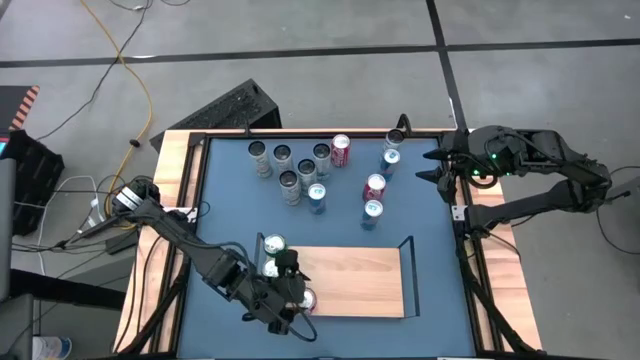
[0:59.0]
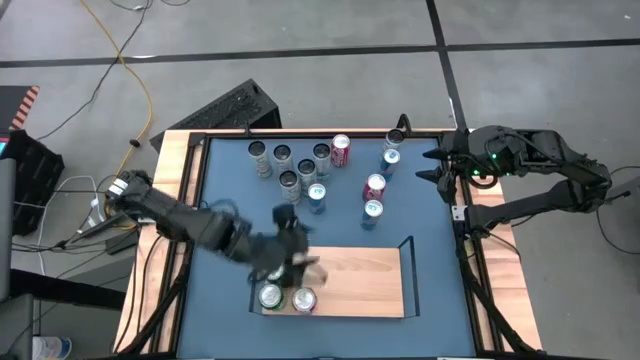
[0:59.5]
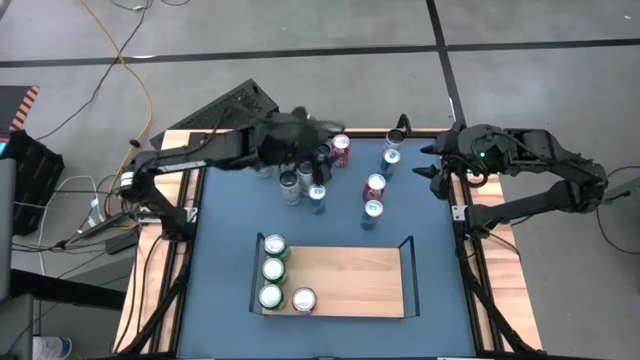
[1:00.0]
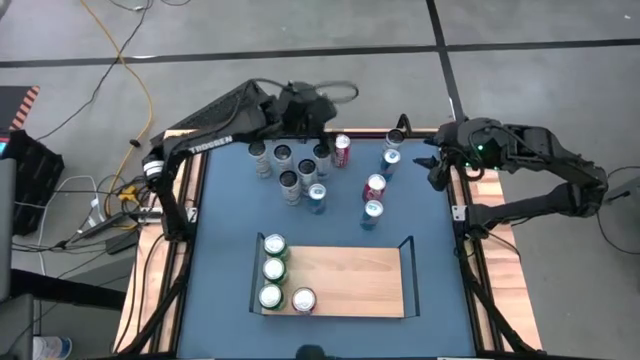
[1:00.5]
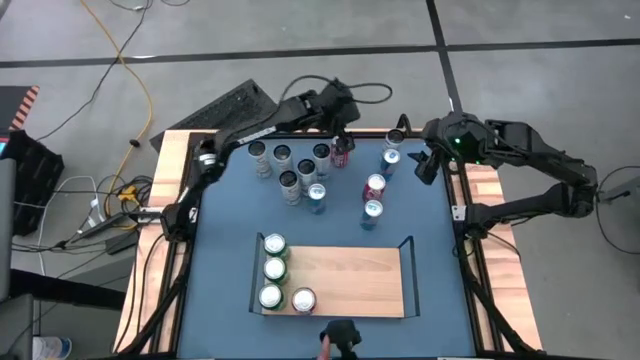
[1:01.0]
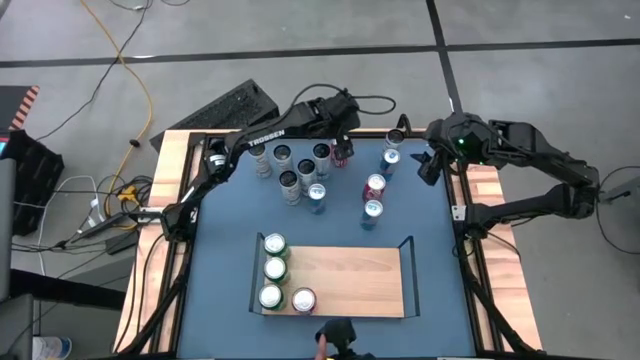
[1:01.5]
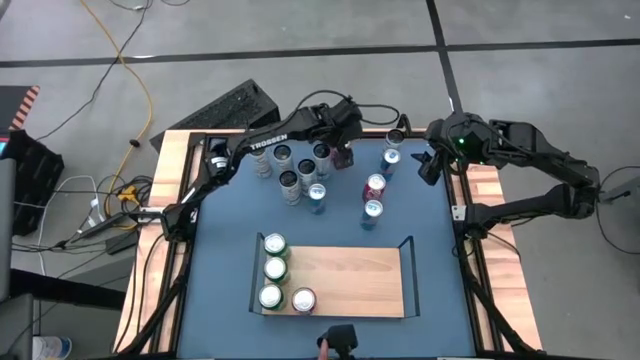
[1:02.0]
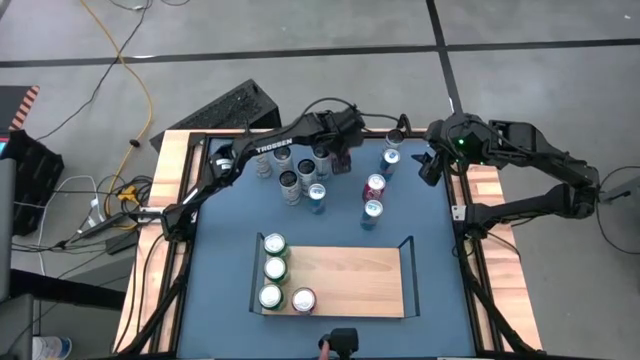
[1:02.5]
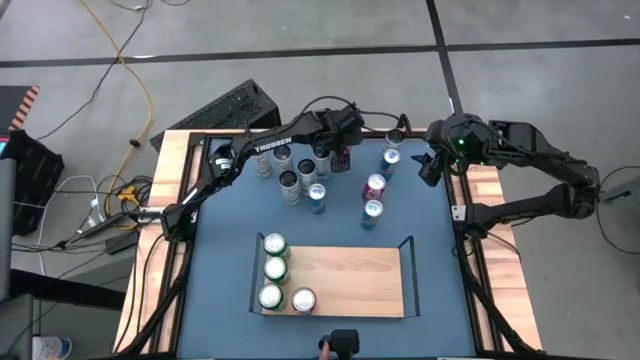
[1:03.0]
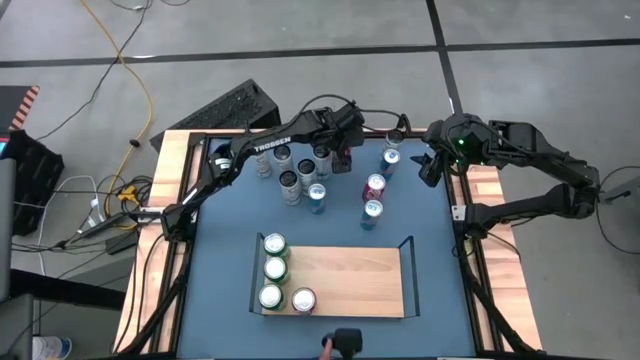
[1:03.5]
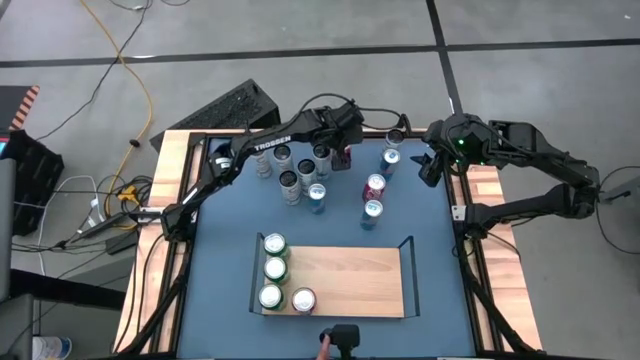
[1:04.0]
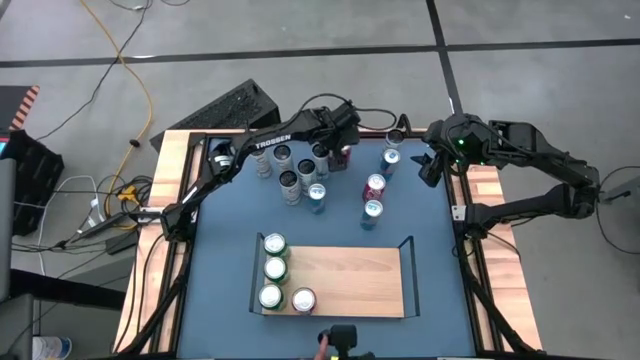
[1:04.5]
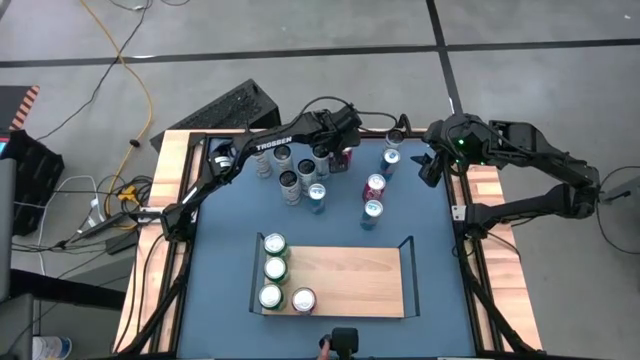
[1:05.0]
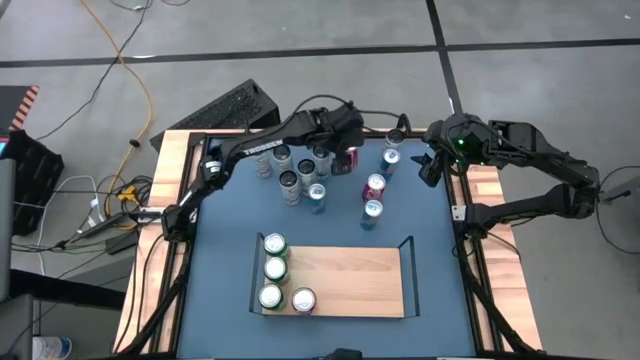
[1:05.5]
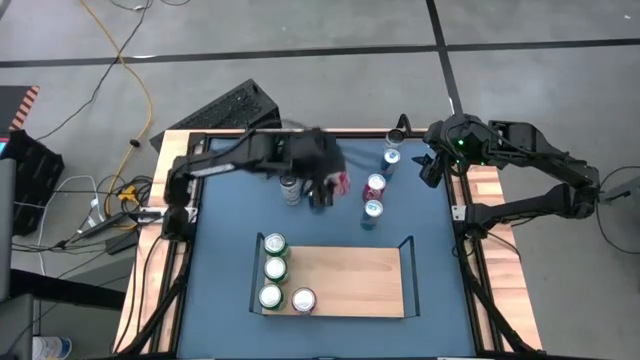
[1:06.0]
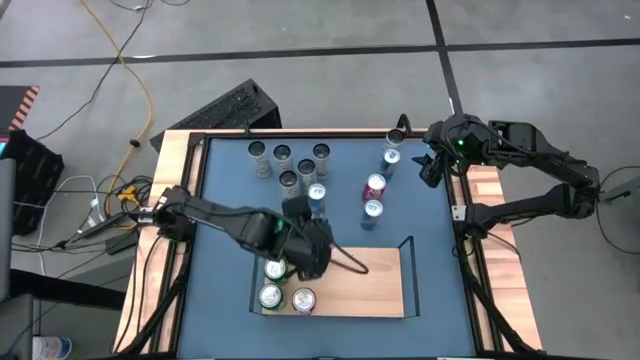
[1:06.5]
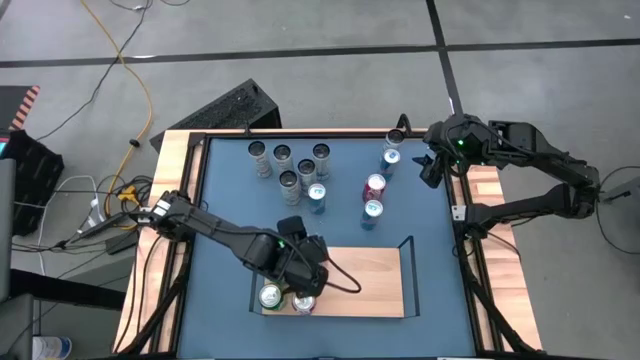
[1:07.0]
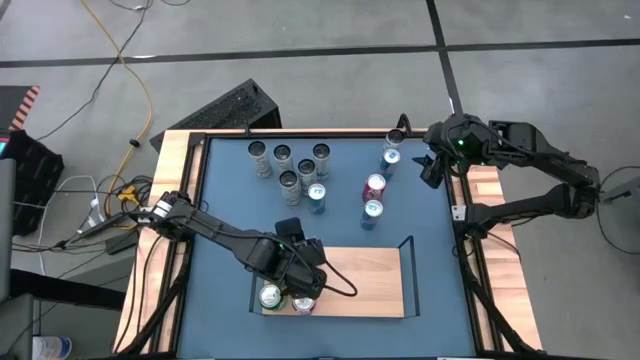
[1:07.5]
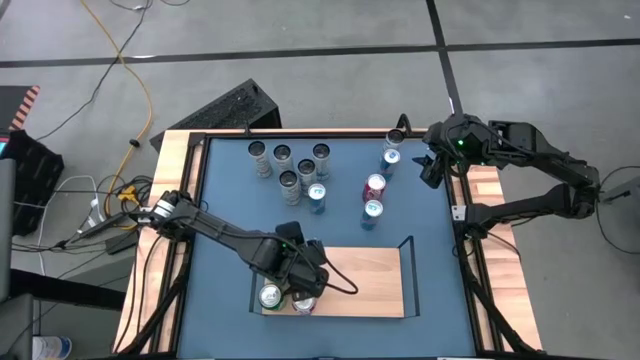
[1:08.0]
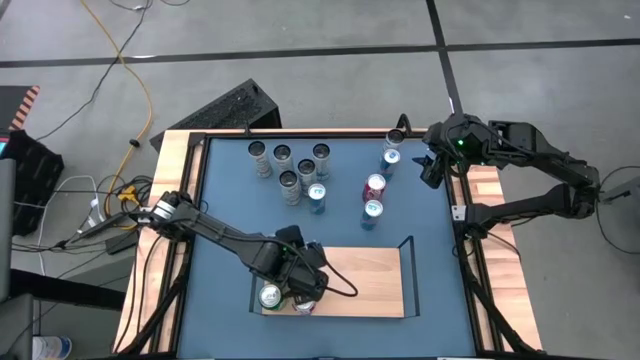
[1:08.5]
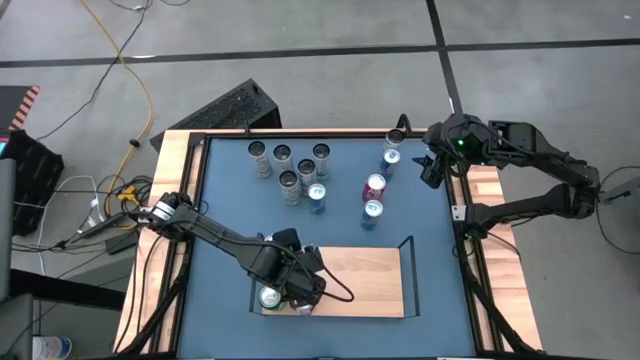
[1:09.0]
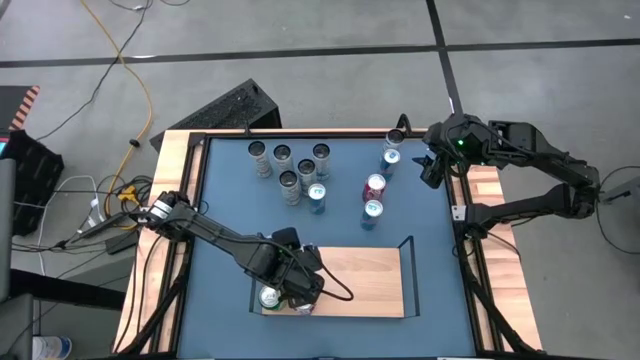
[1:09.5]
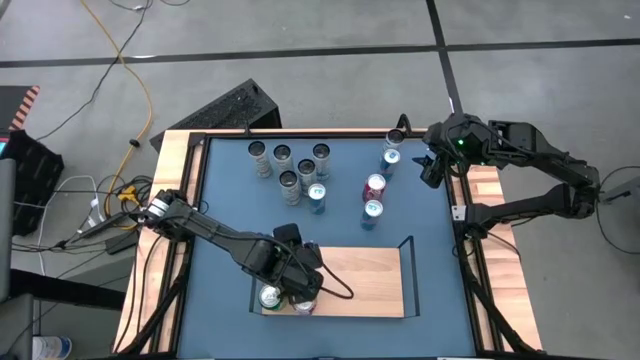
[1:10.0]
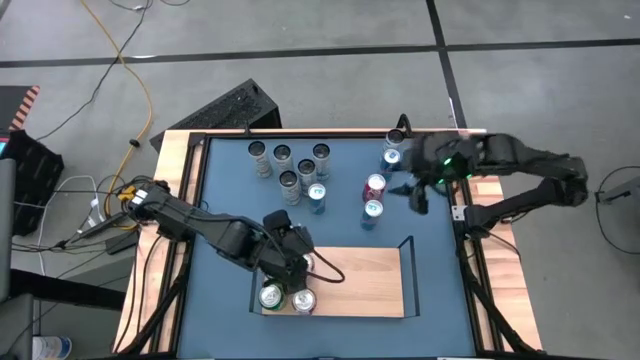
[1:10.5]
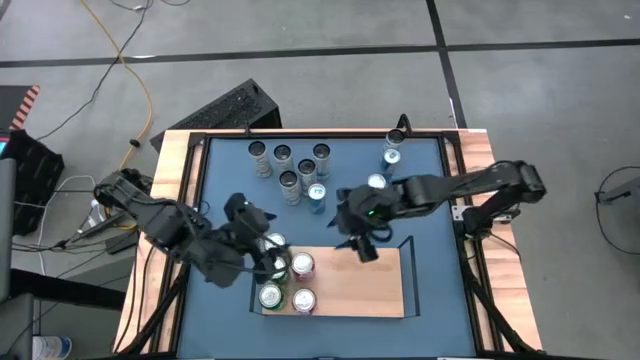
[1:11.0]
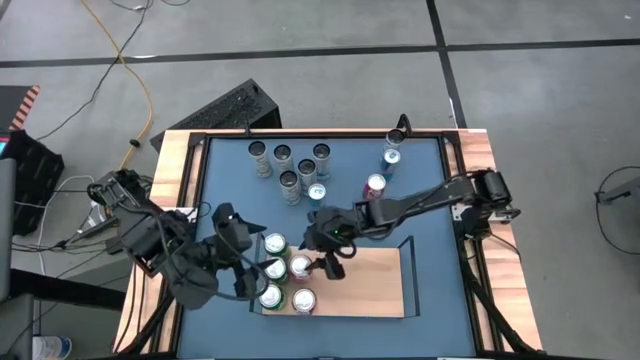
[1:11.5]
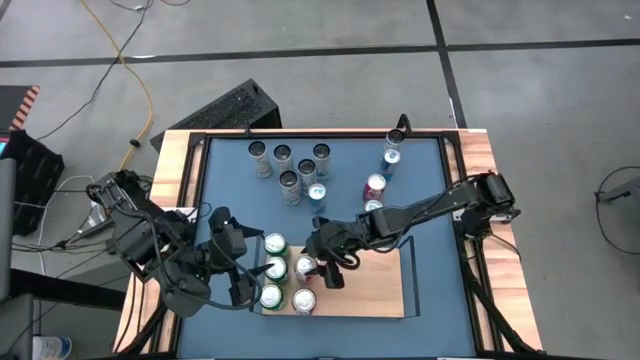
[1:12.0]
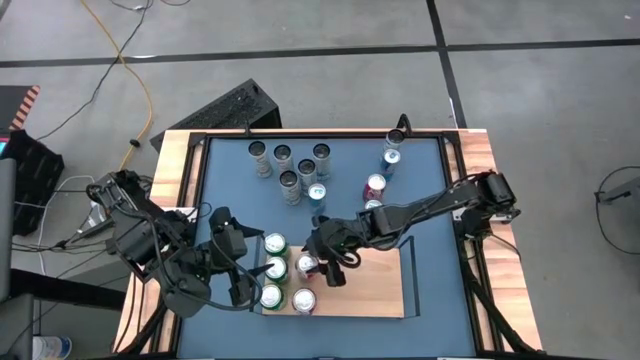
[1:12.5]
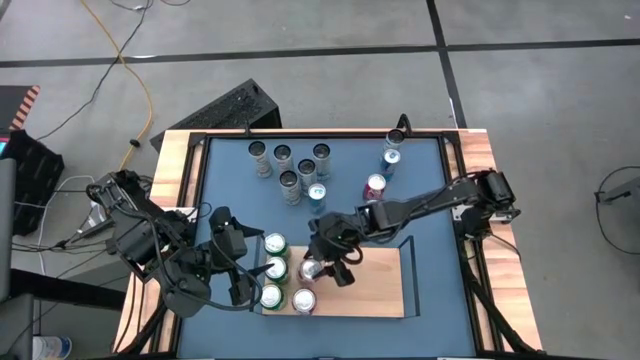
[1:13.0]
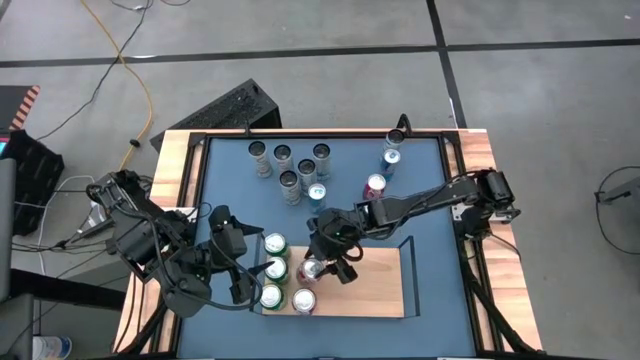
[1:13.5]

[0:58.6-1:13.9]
Task: Place canned beverage on shelf
Put the top red-white soda can on the shelf aligned with the other red-white soda can

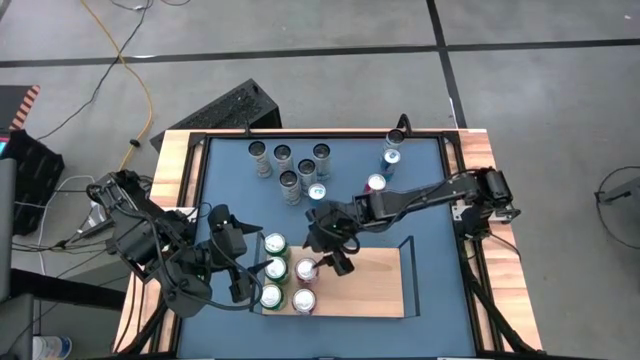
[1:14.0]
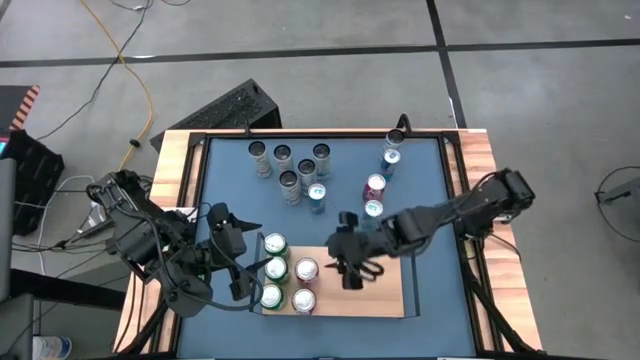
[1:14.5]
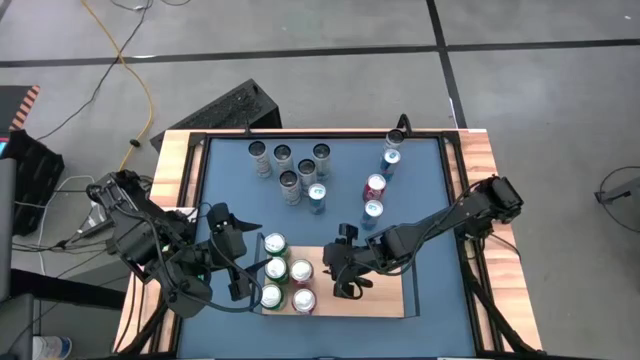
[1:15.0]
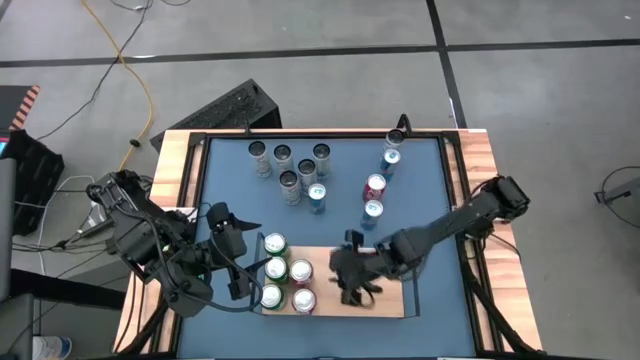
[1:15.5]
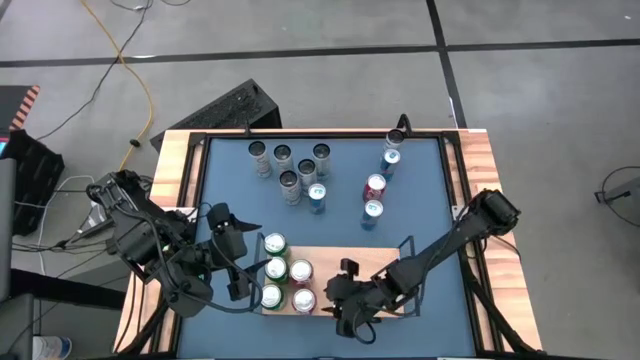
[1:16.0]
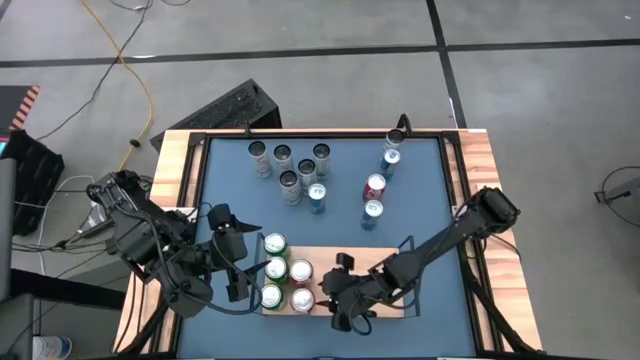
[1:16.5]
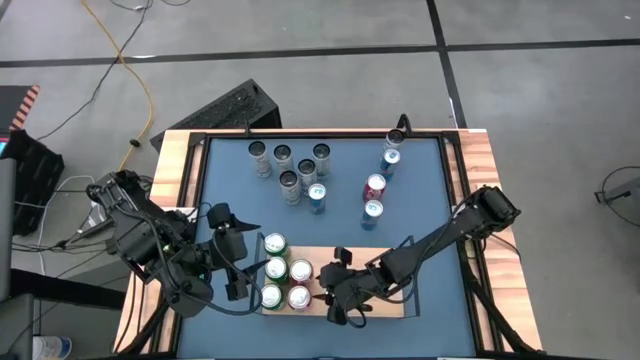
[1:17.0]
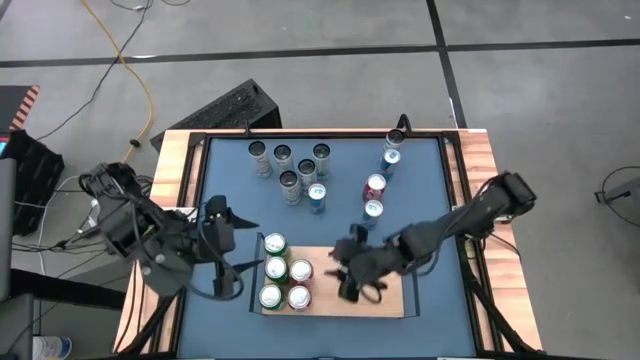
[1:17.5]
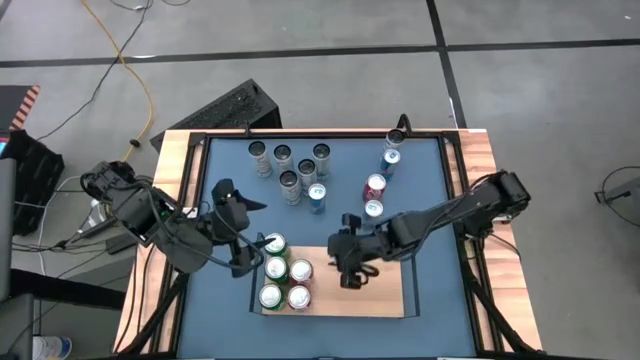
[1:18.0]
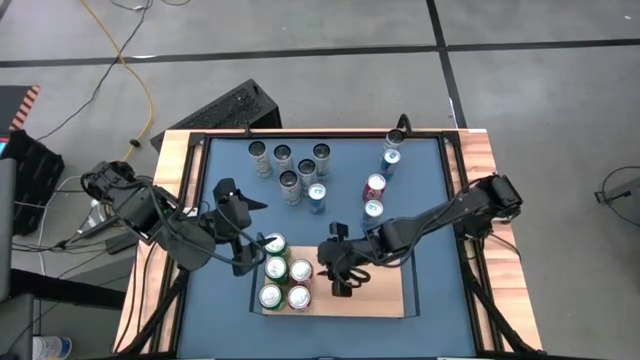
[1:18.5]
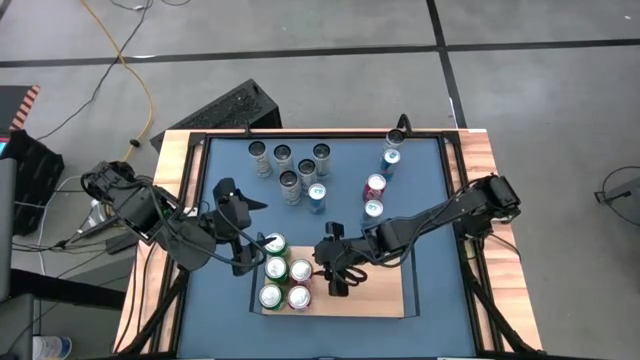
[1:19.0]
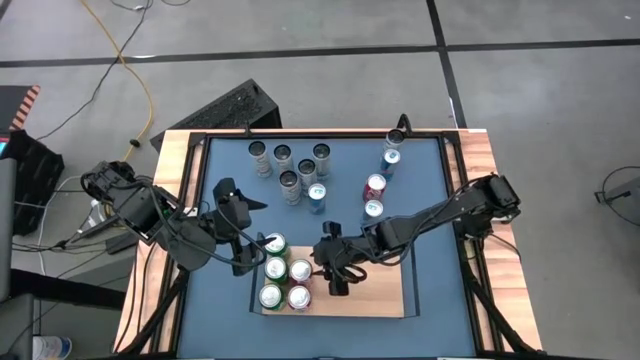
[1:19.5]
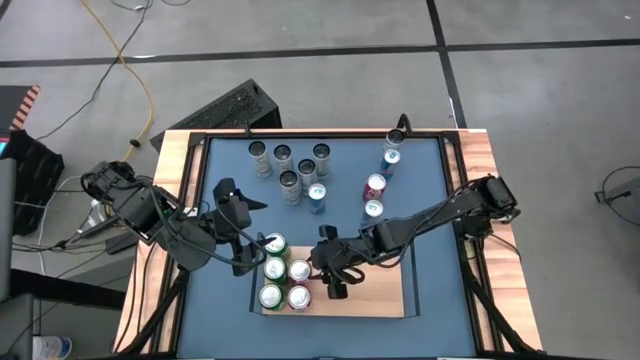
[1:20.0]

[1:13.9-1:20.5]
Adjust the red-white soda cans on the shelf
